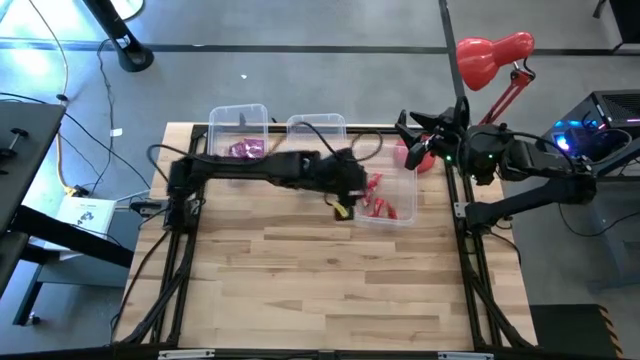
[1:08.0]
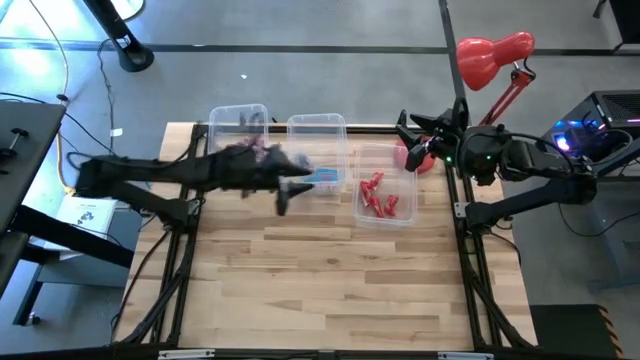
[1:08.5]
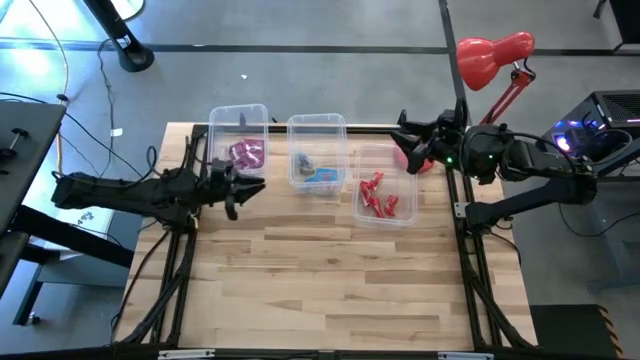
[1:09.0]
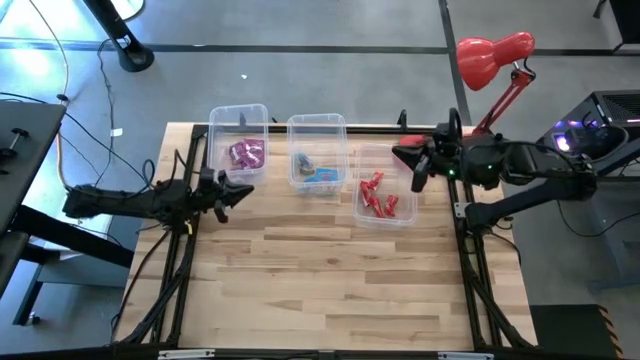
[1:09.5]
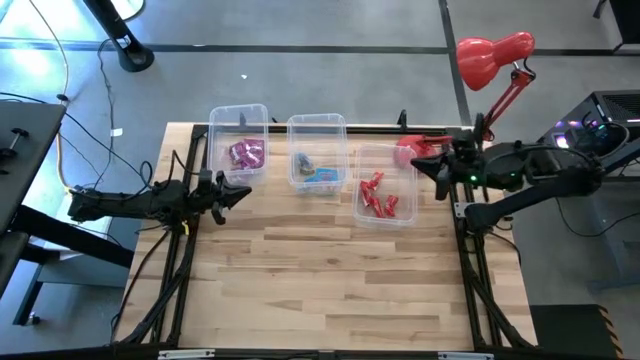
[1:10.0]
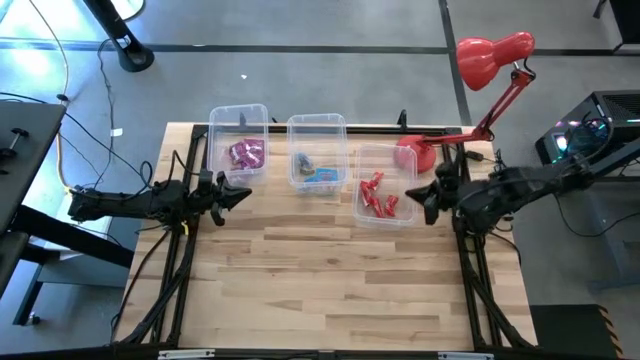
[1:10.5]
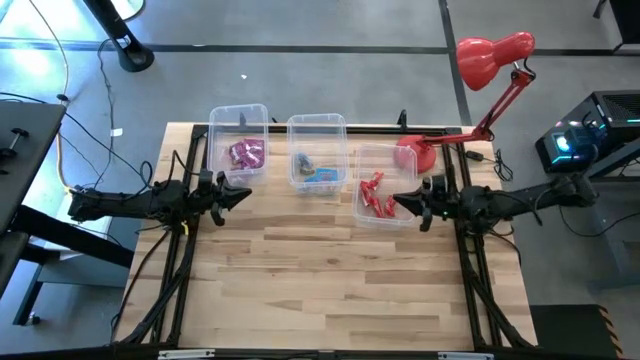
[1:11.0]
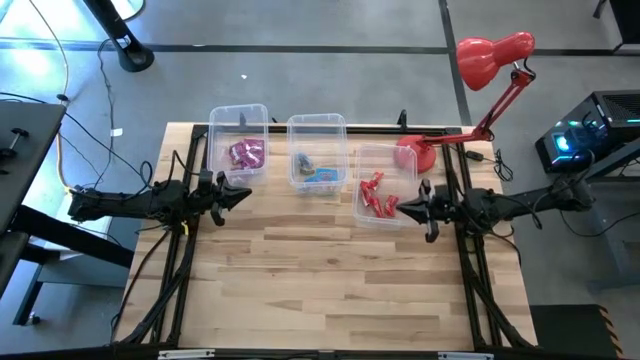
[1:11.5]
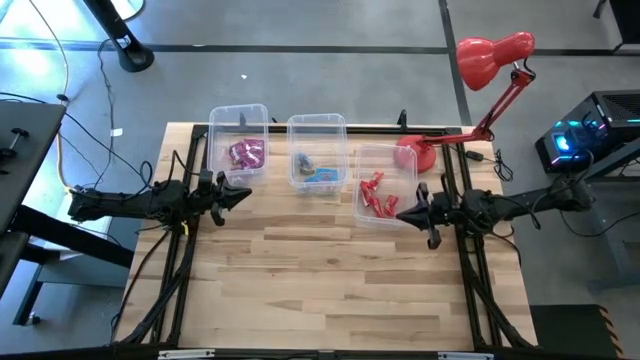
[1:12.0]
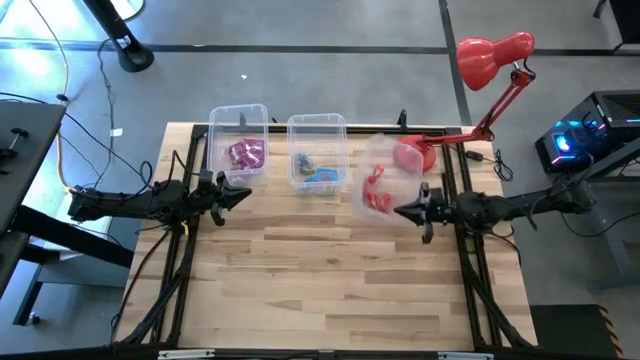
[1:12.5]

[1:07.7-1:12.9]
Task: Sort candy
Return to Home Position

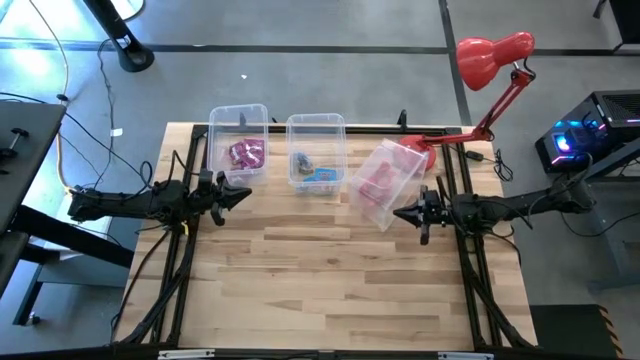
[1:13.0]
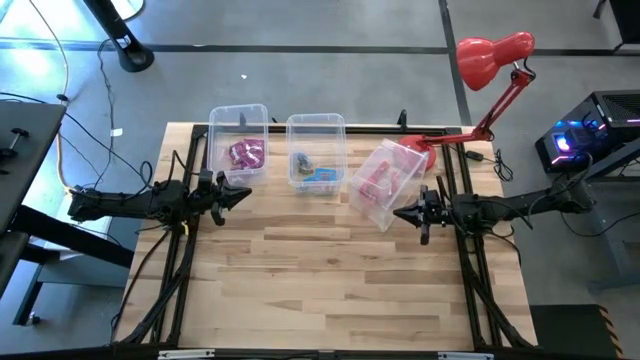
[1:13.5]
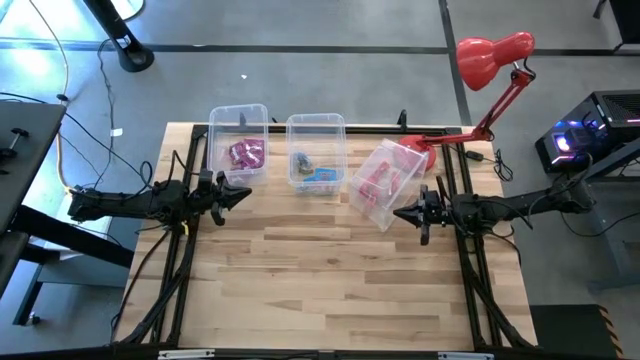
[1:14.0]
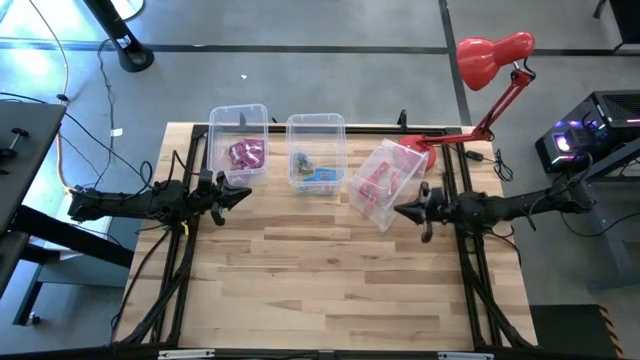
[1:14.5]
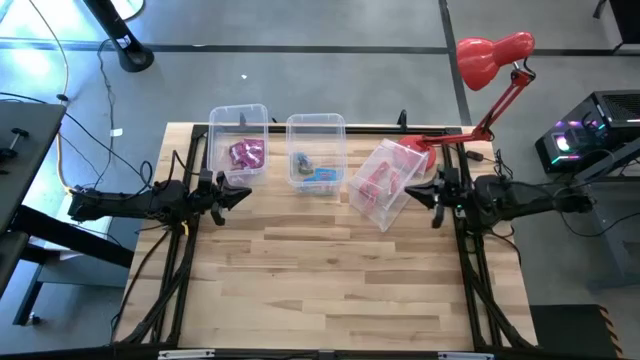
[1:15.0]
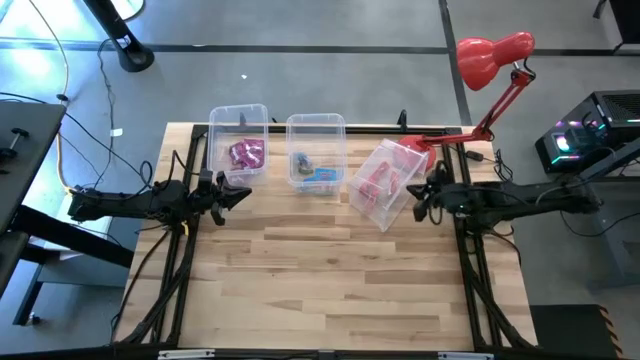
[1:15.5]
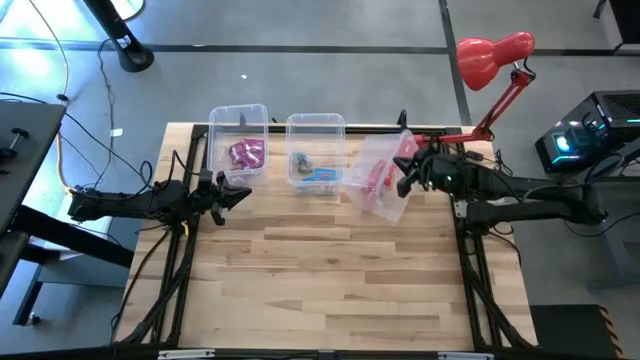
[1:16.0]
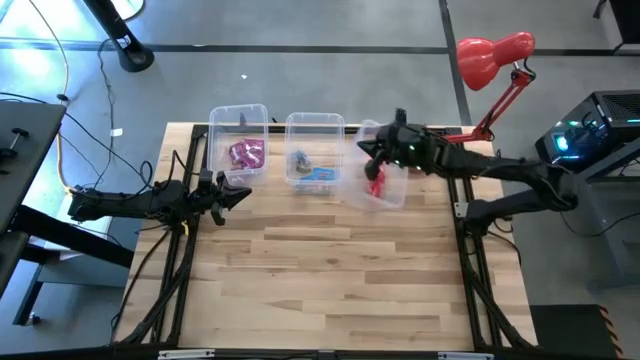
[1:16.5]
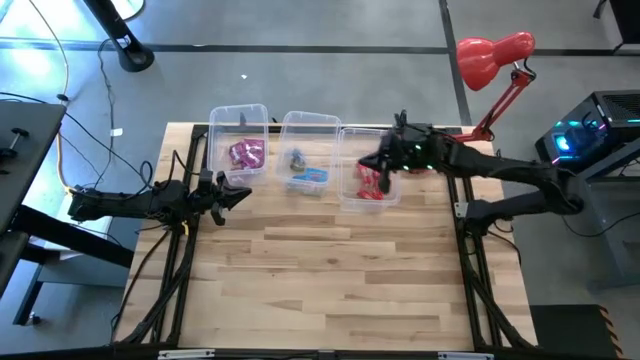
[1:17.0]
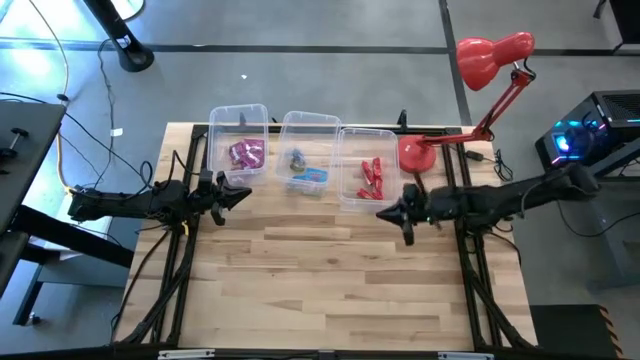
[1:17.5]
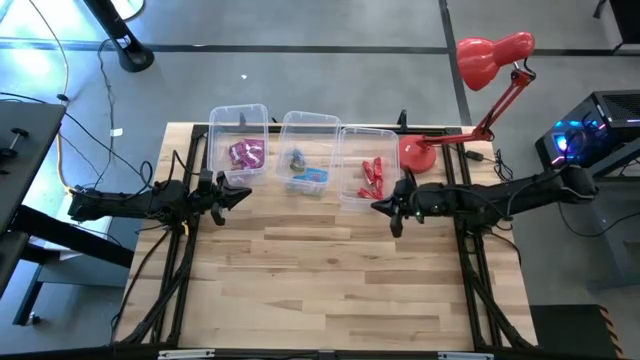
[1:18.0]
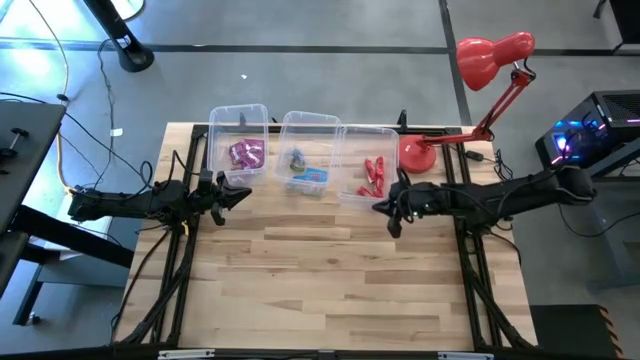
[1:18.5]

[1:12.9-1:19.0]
Adjust the right transparent bin

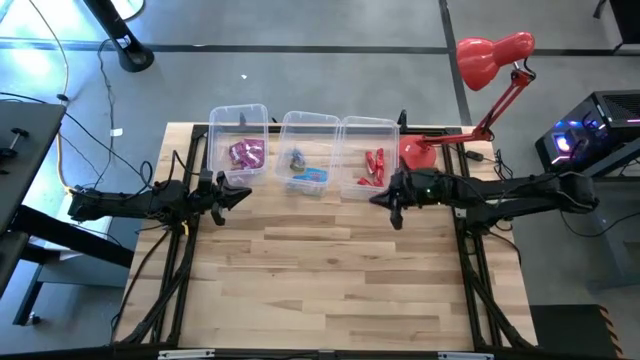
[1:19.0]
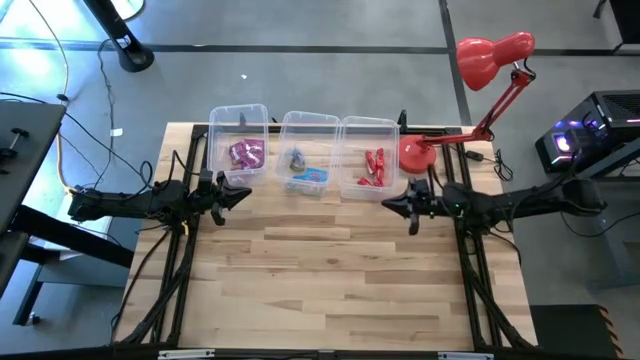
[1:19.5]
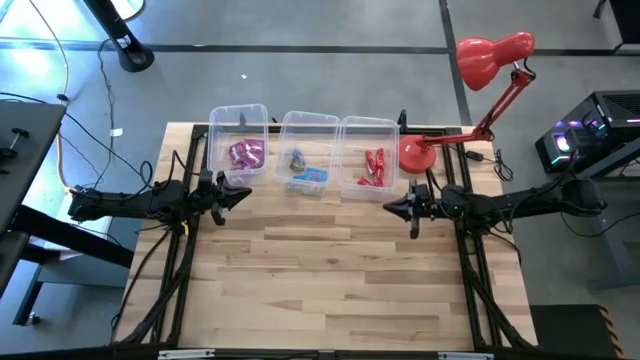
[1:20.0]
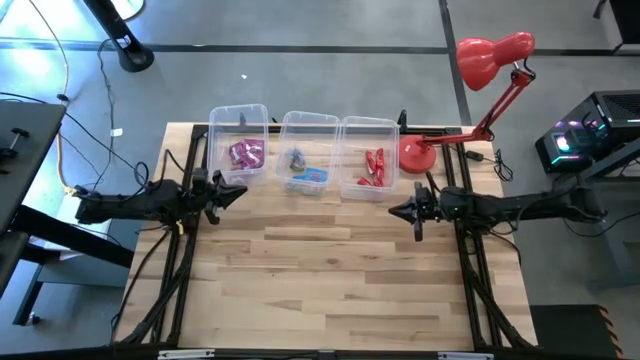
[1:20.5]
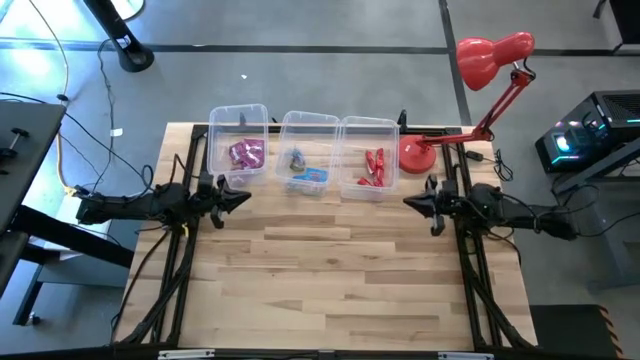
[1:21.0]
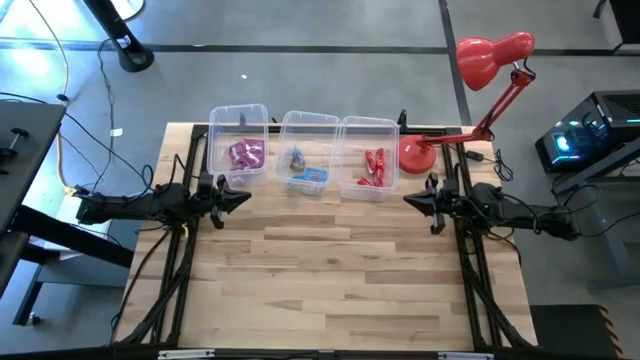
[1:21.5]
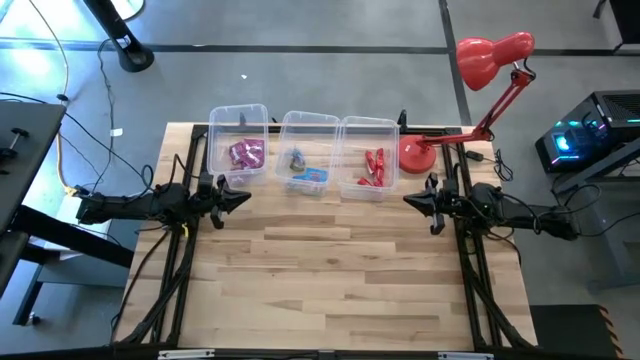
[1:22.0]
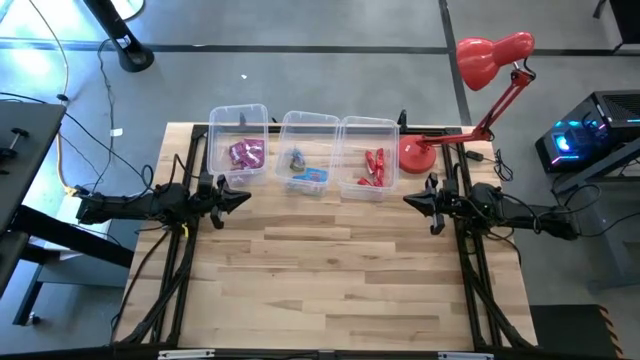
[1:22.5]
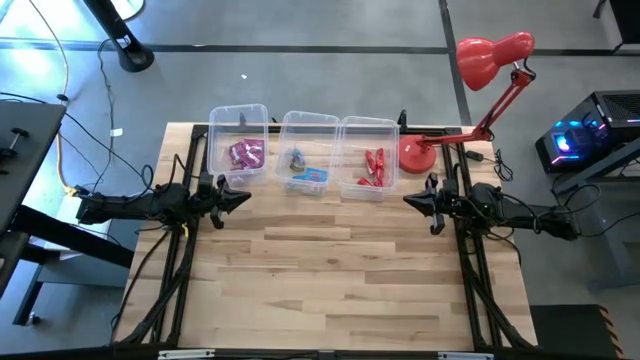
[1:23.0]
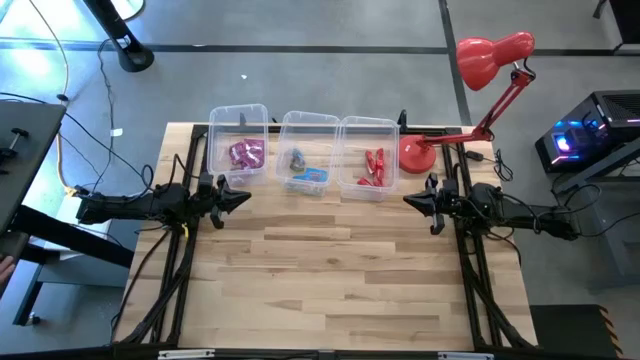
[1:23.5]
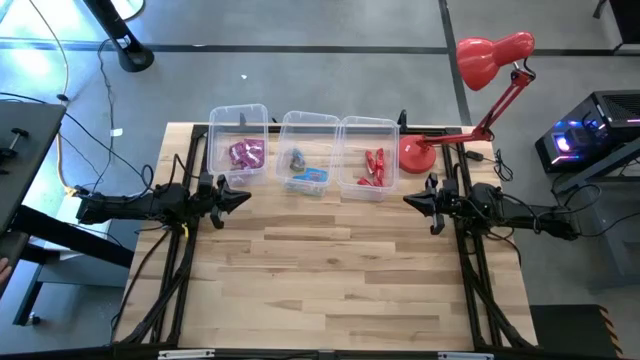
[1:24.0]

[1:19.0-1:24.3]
Return to Home Position

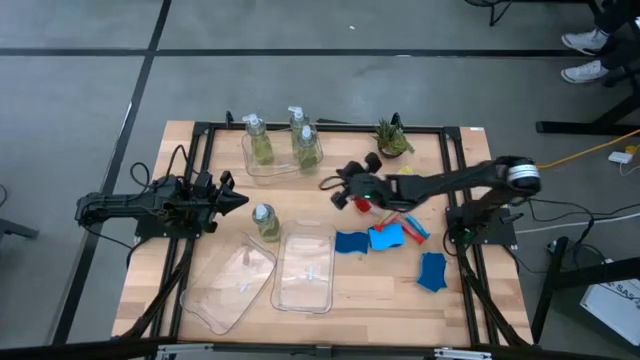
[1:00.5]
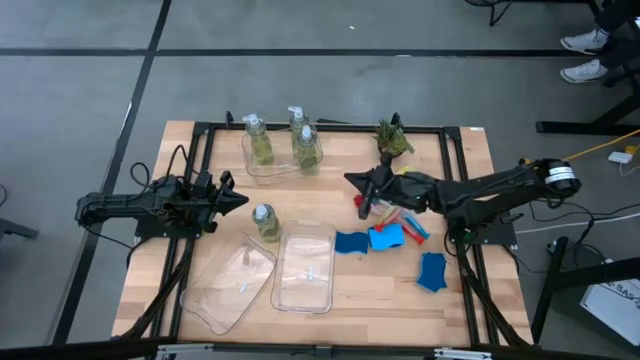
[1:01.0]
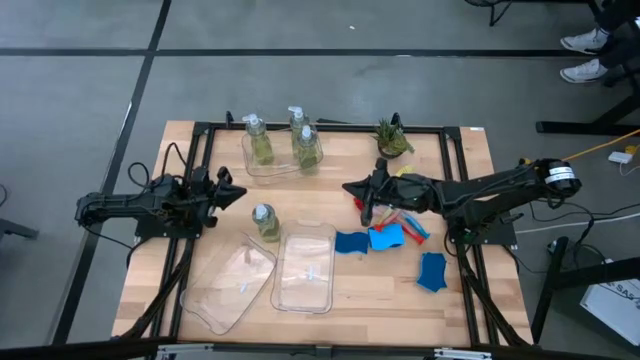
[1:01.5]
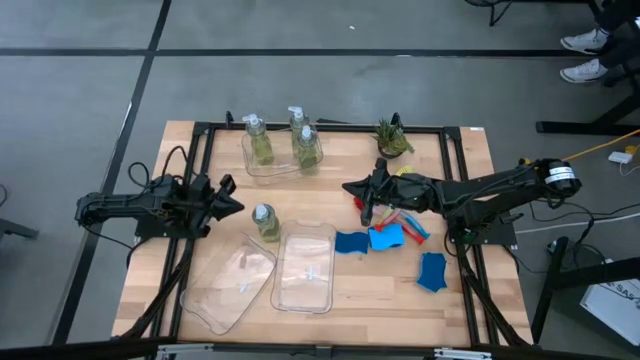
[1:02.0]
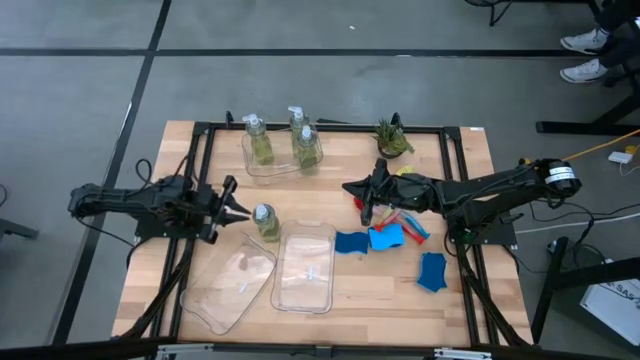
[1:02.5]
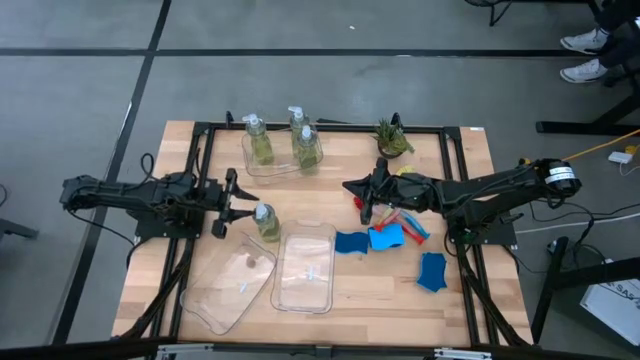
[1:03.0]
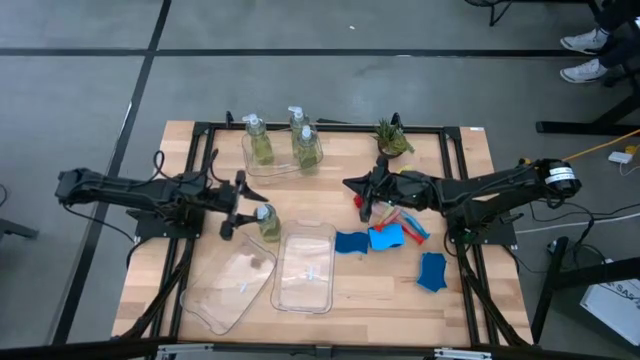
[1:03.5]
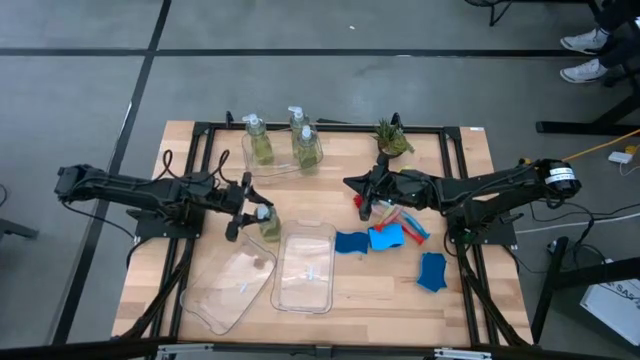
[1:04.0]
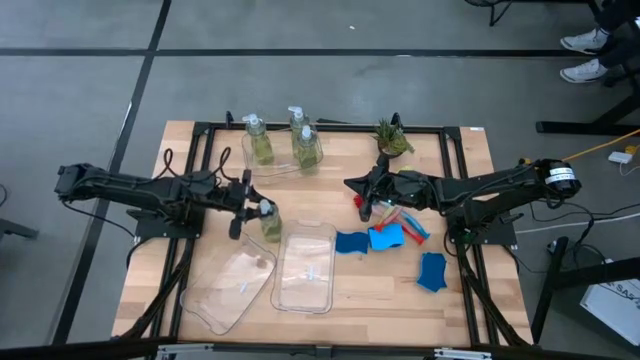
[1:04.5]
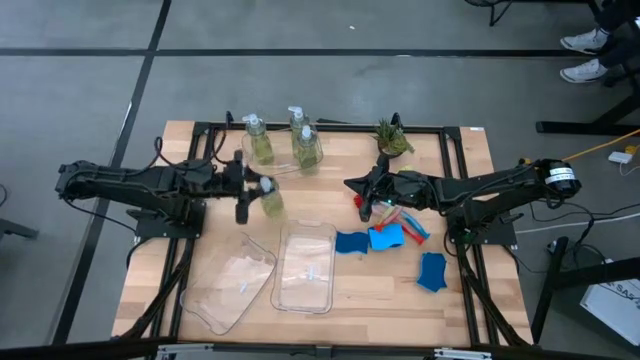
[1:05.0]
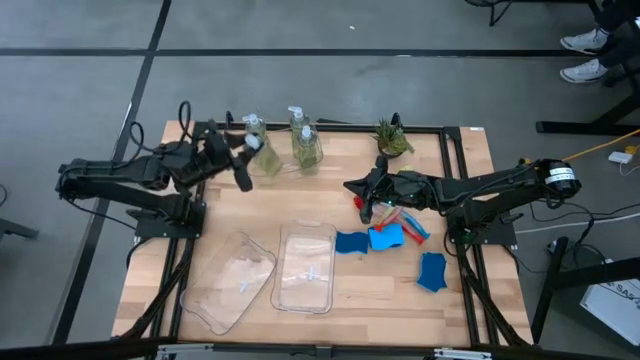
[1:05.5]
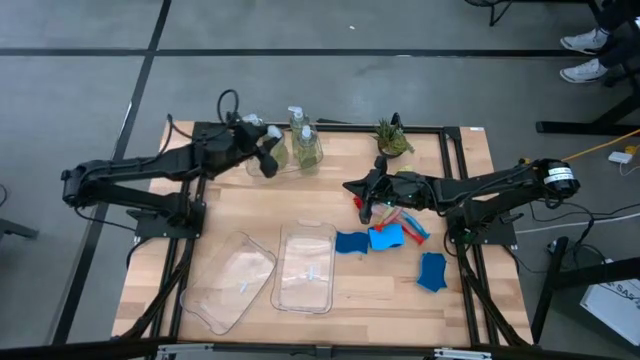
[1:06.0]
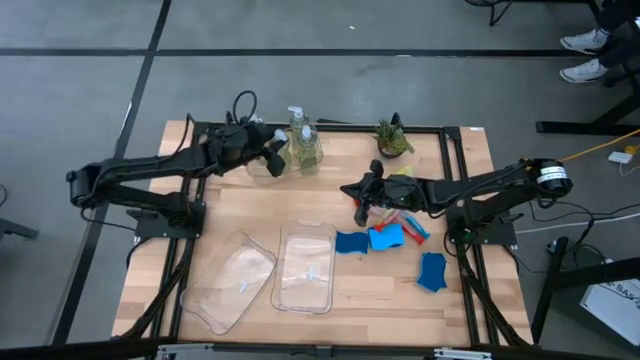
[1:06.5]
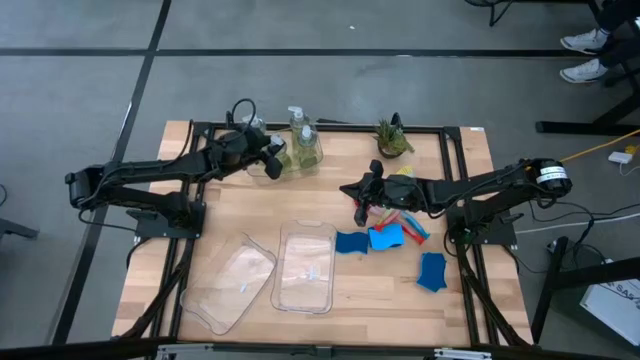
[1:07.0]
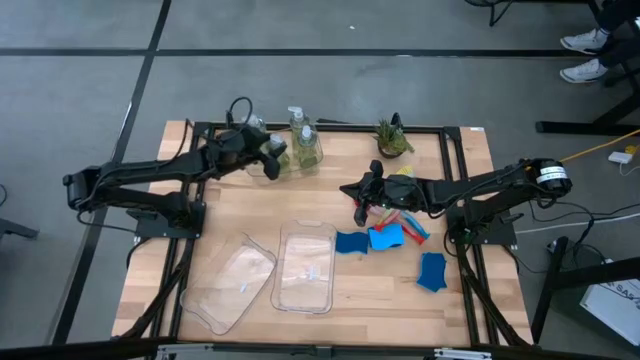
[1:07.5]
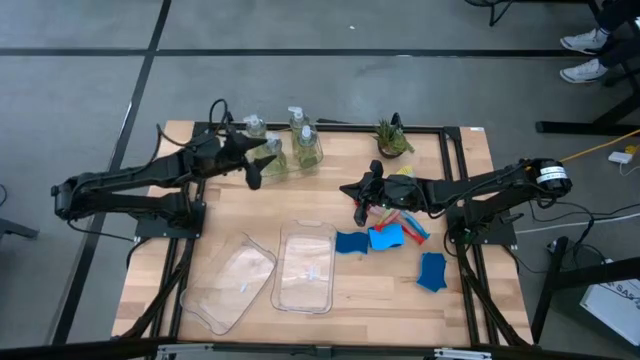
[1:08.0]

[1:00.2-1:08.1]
Task: Pick & Place Kitchen Sink Supplies
Put the green soap dispenser into the top transparent bin
